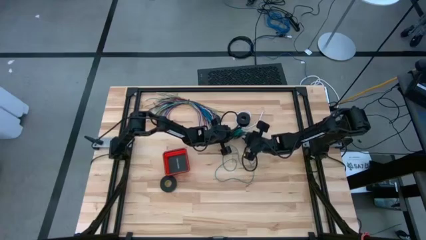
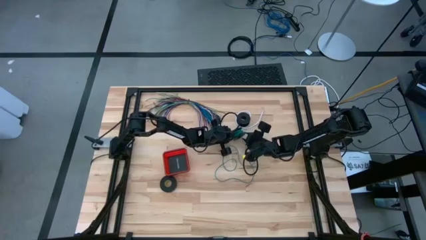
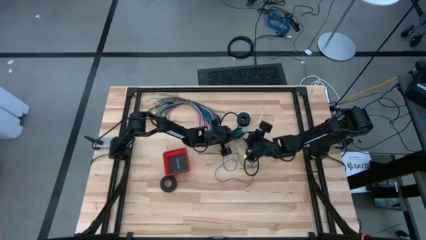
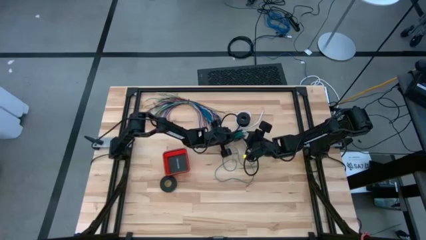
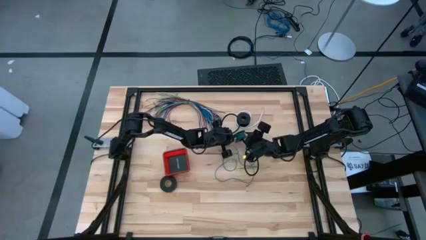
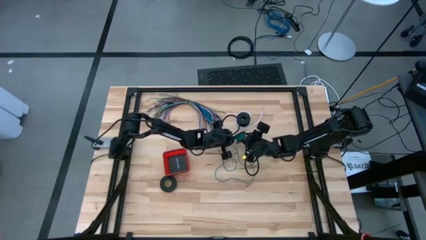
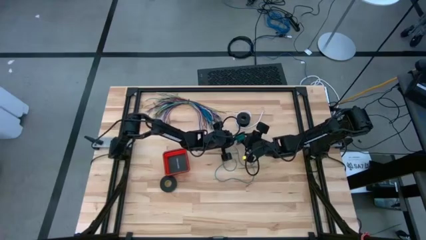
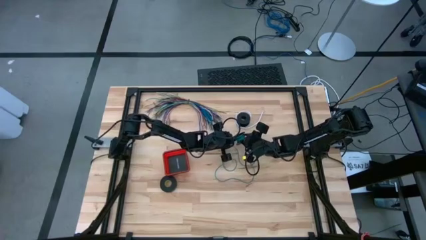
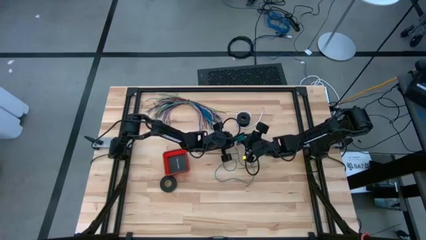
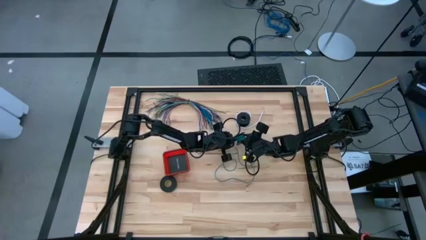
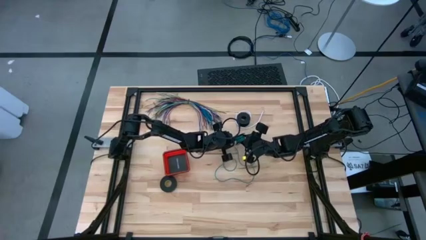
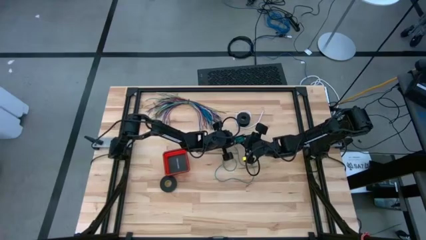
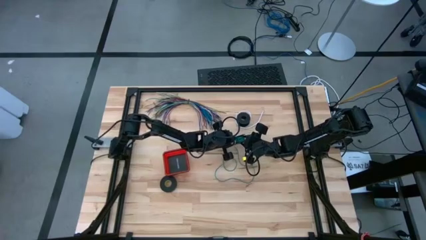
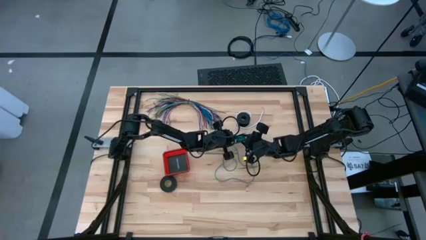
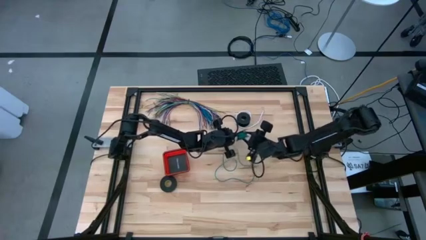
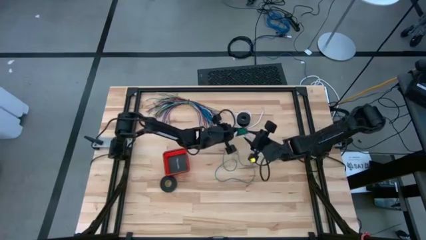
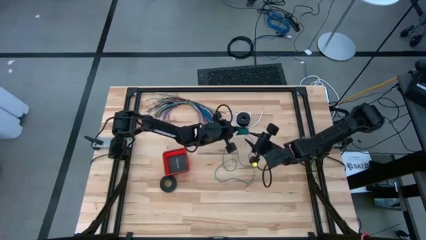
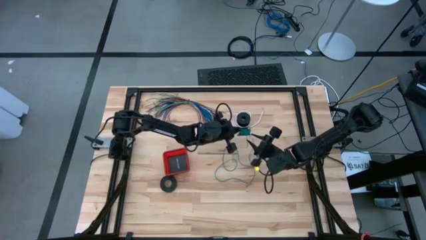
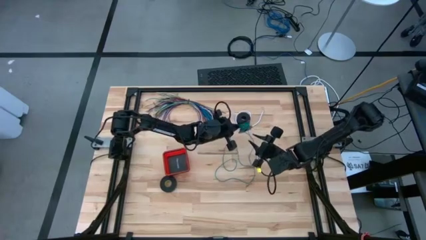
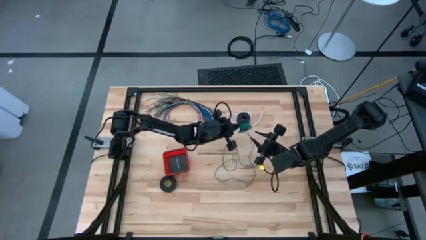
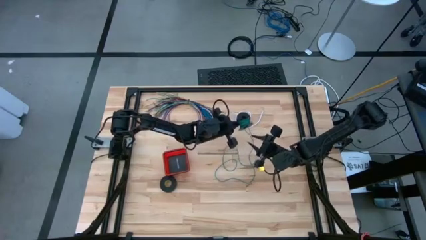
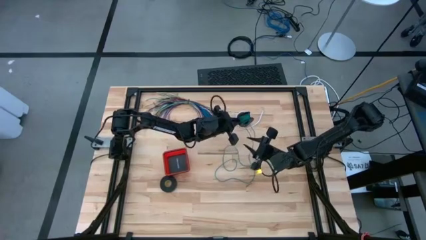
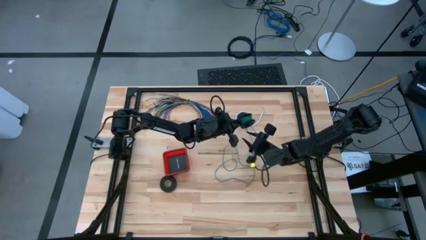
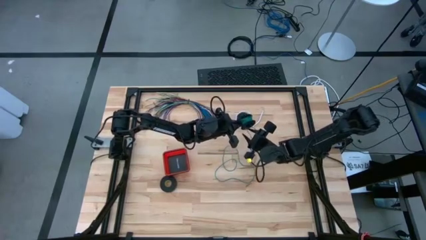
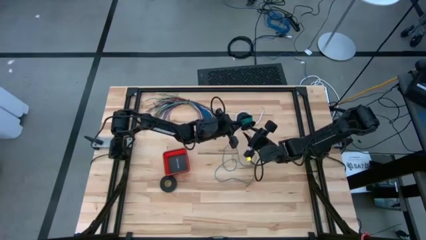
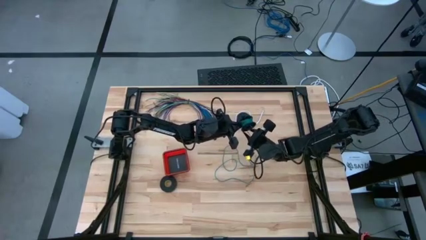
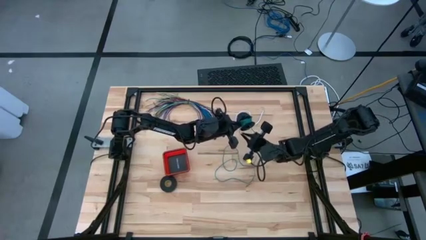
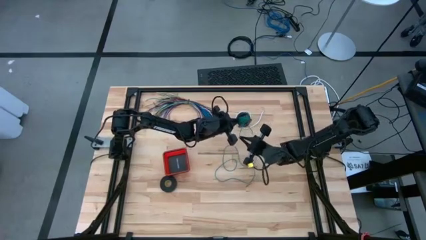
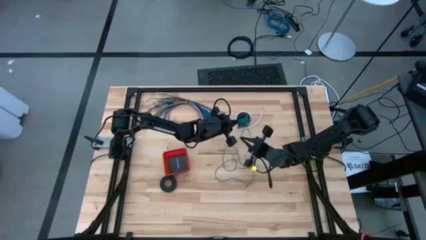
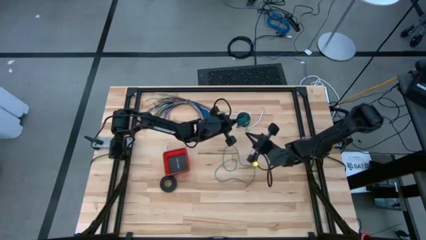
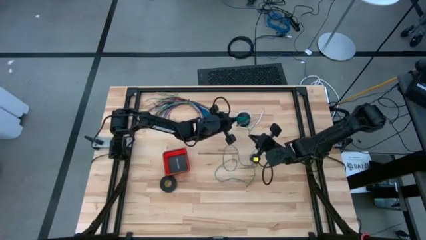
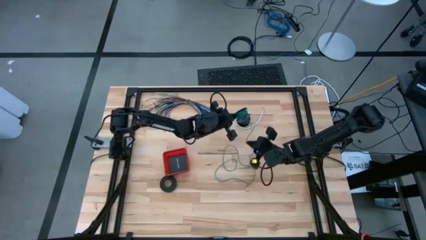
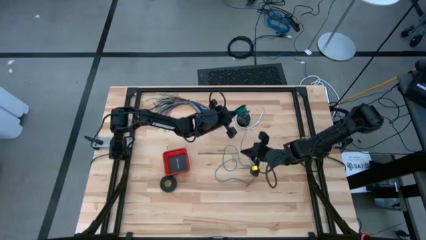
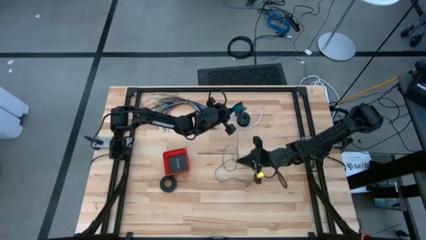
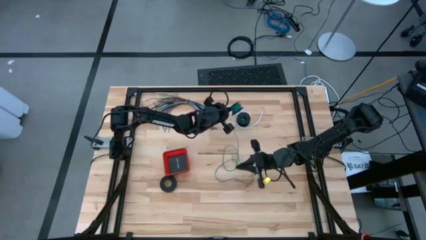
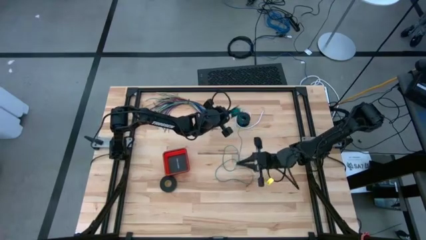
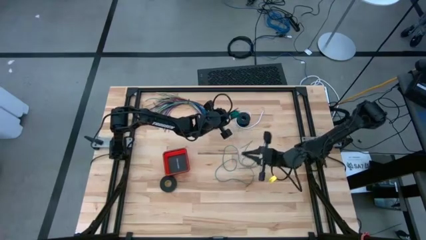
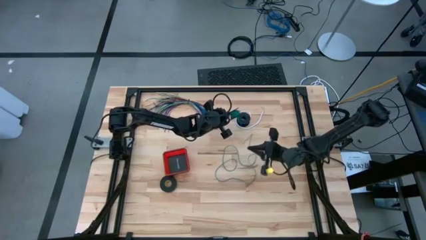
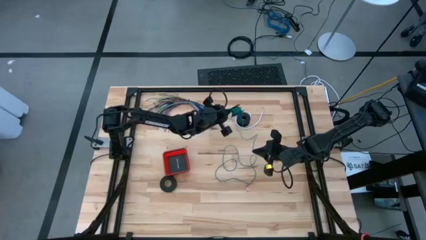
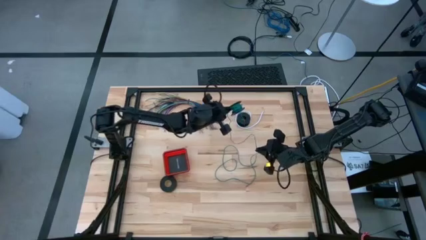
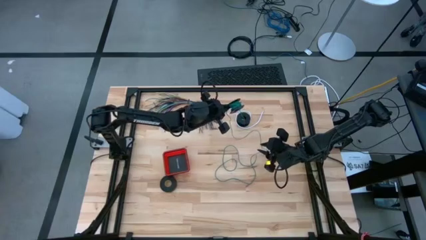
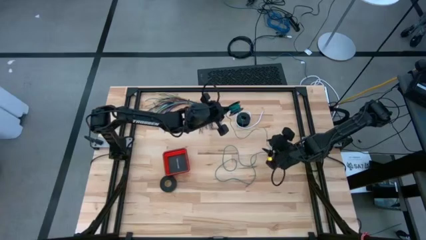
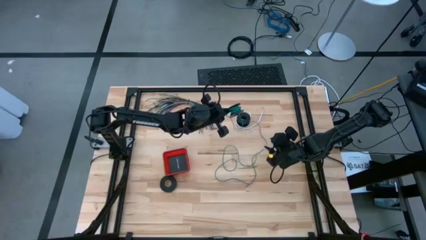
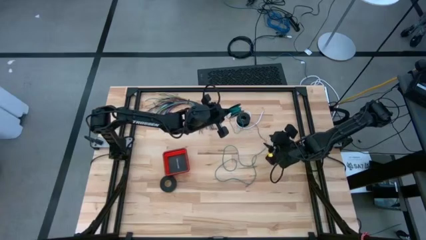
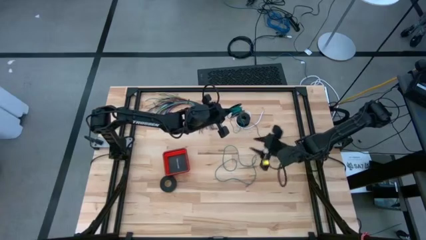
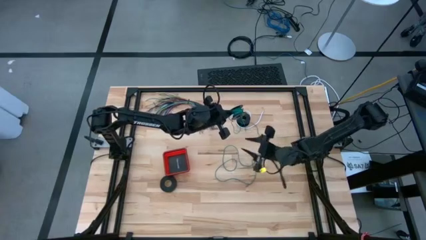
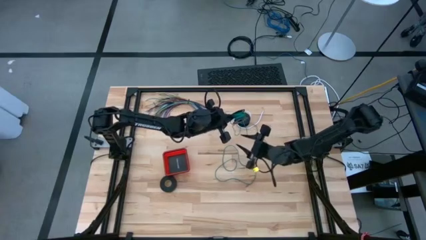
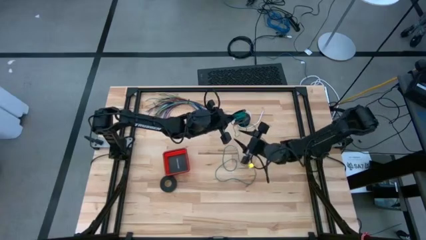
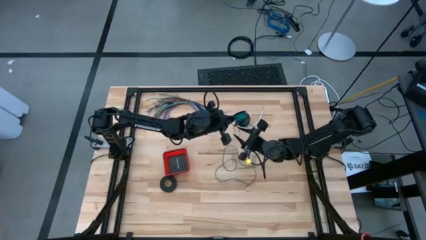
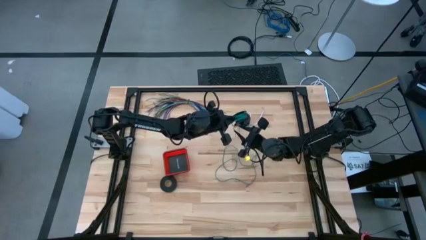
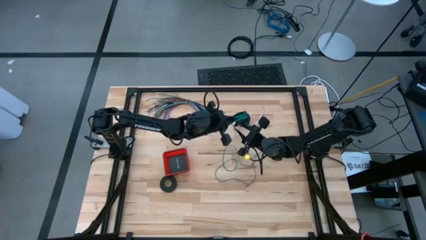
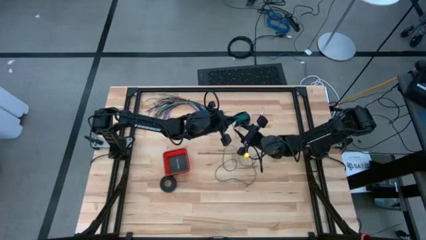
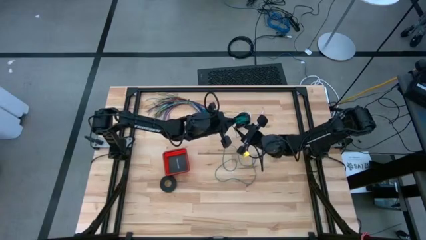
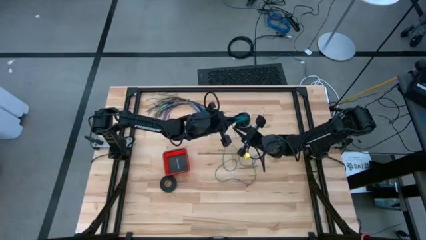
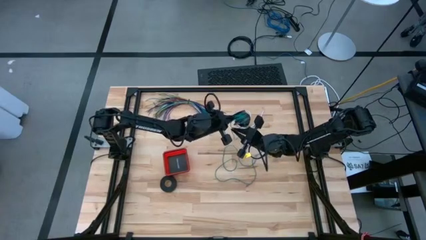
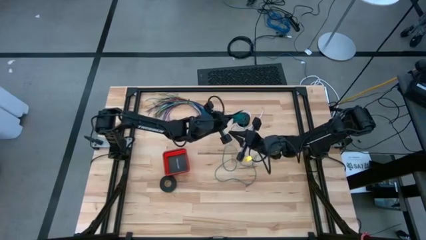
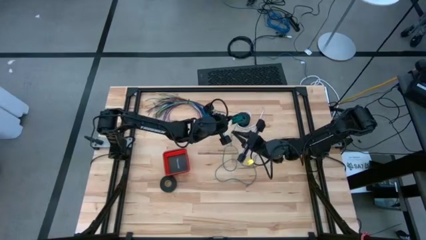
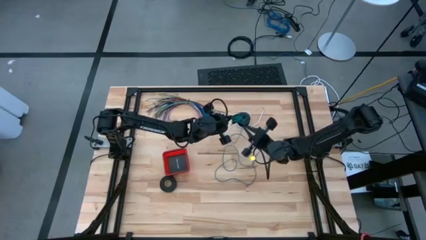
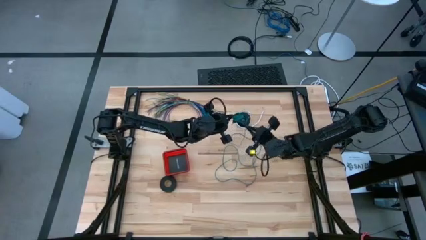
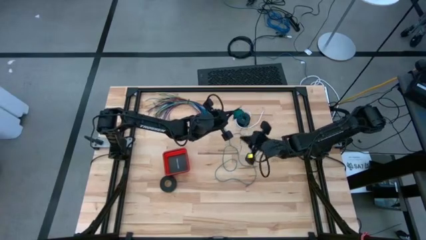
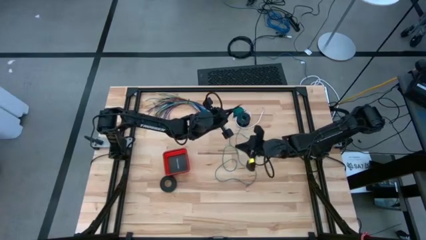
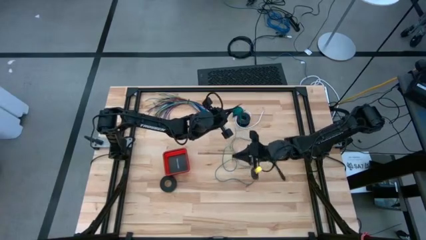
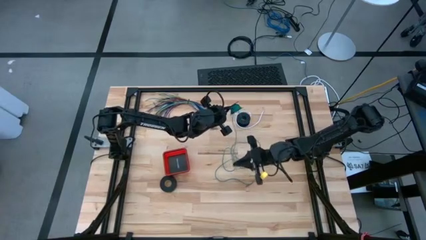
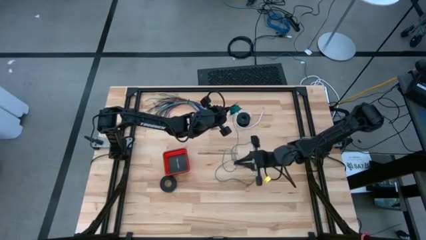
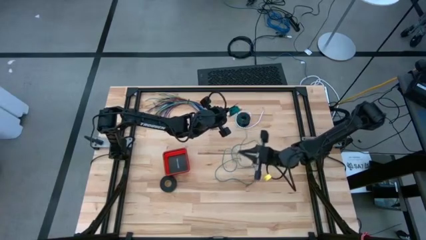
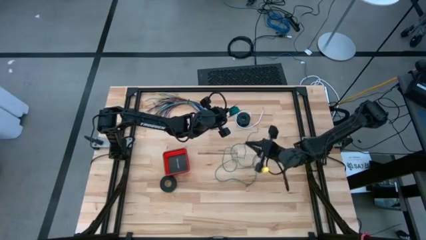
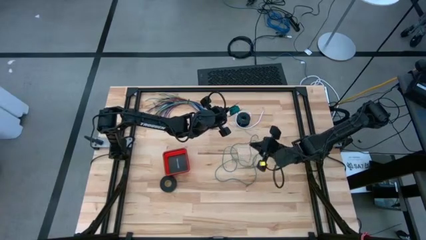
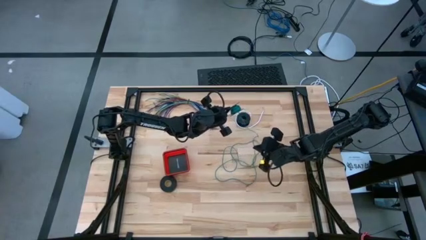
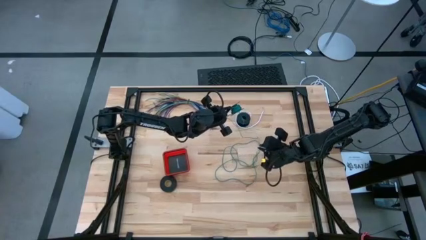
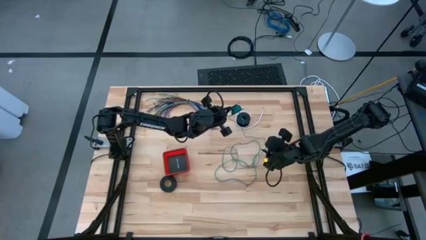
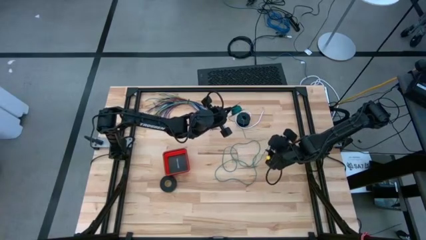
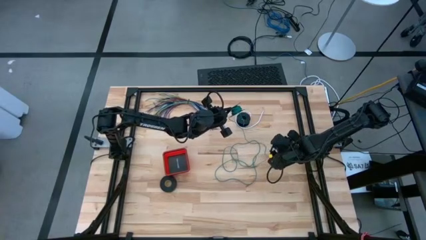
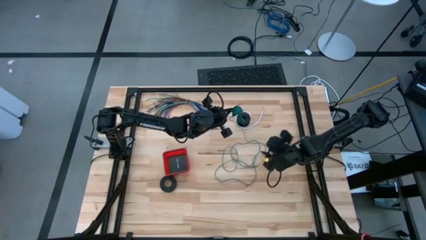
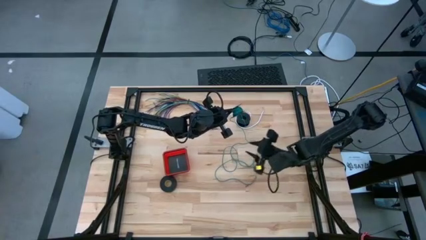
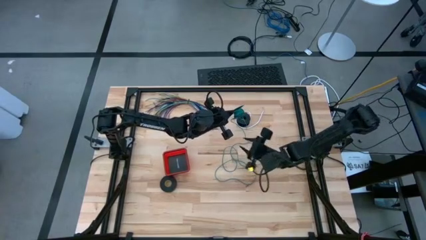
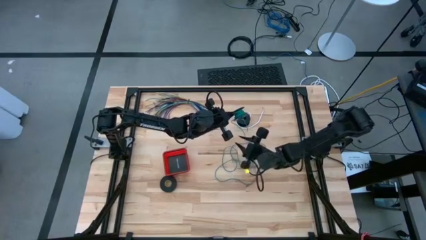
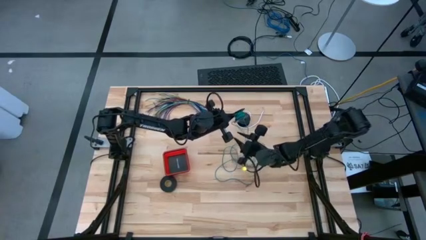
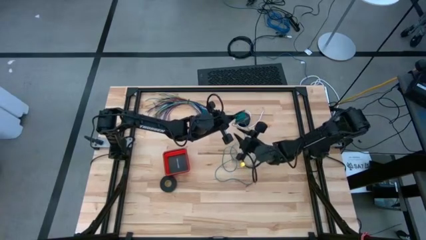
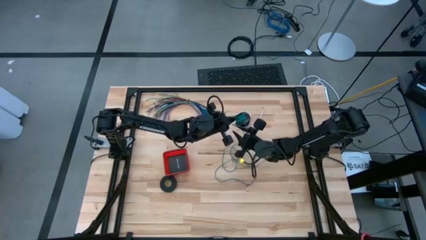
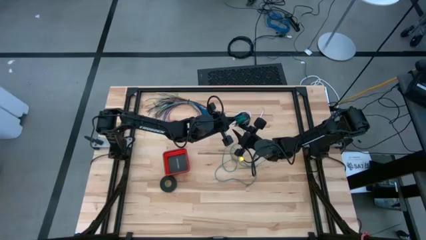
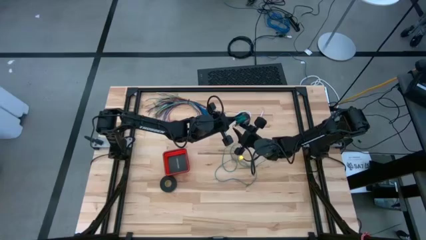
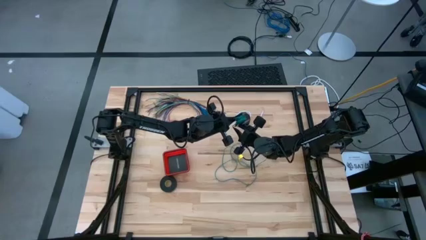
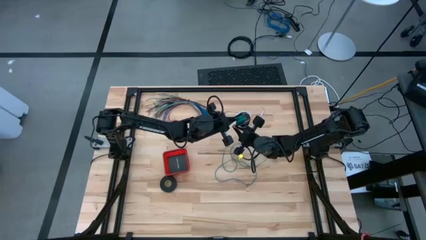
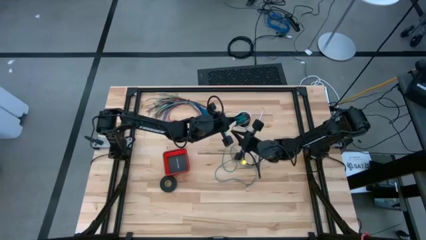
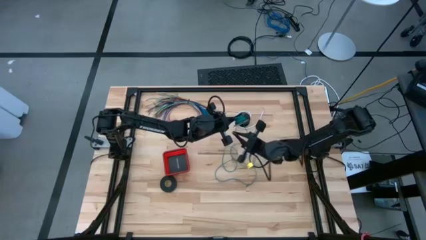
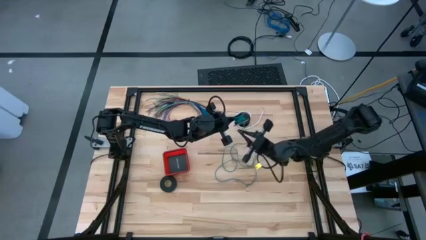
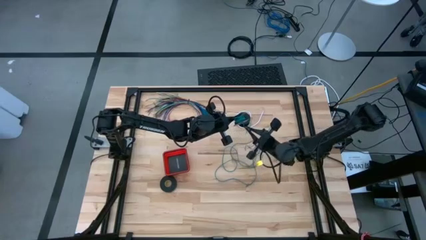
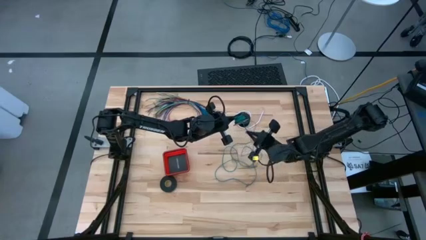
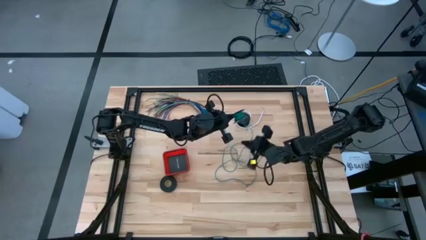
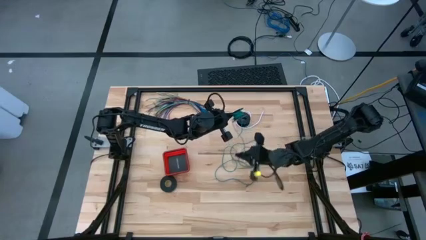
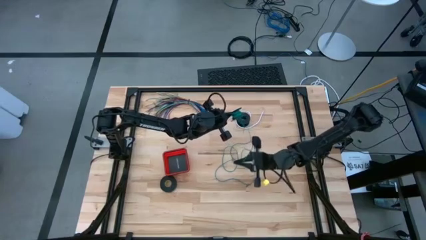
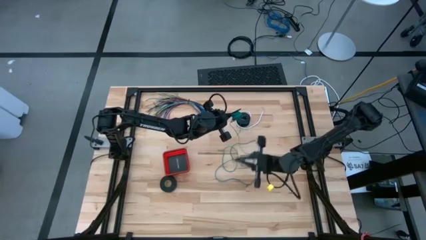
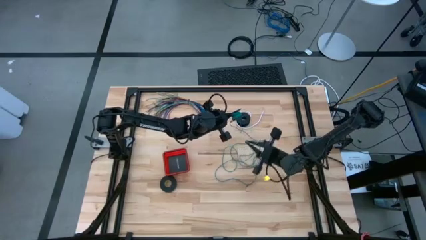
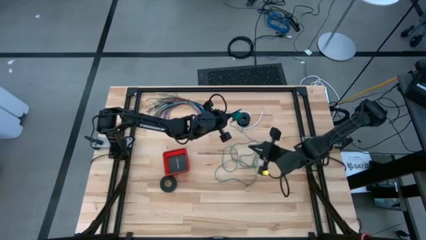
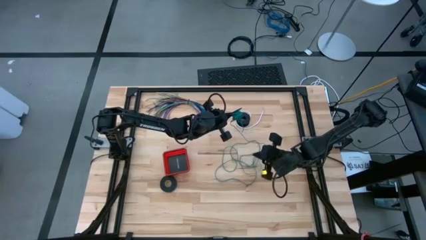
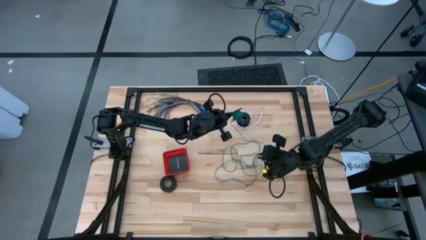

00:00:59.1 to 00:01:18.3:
Task: Coil cords
Uncoil the green wire from the spool
